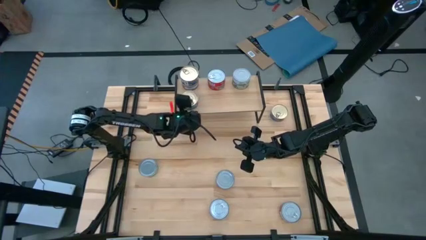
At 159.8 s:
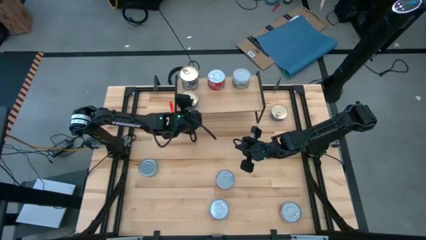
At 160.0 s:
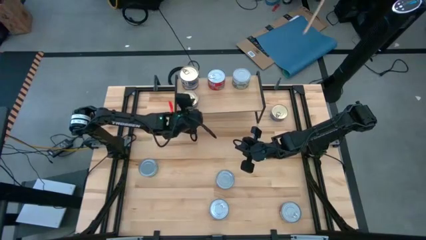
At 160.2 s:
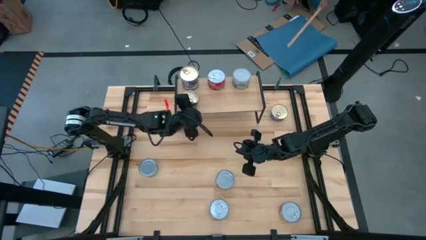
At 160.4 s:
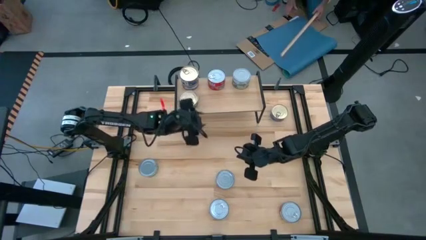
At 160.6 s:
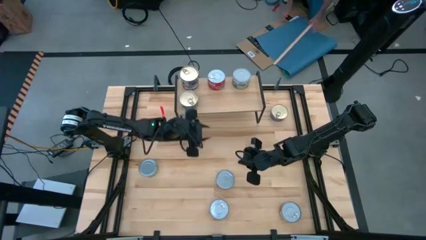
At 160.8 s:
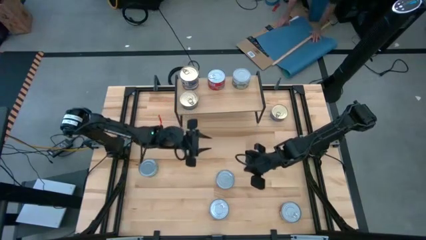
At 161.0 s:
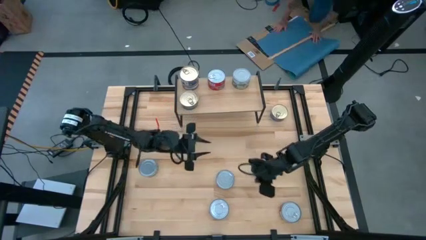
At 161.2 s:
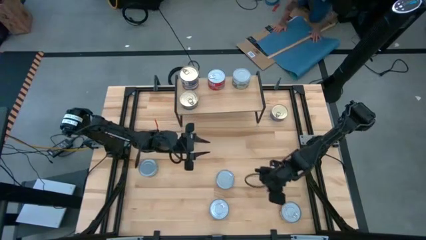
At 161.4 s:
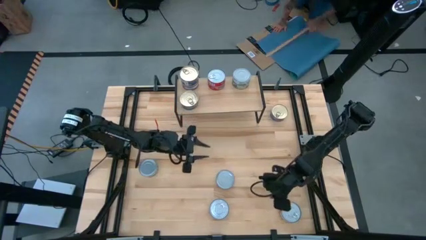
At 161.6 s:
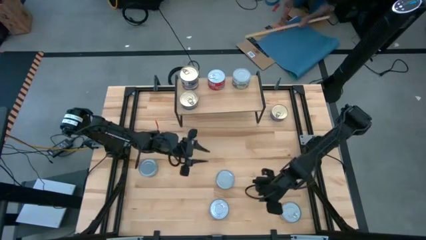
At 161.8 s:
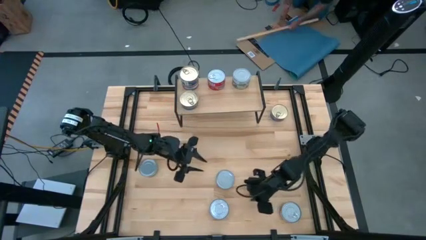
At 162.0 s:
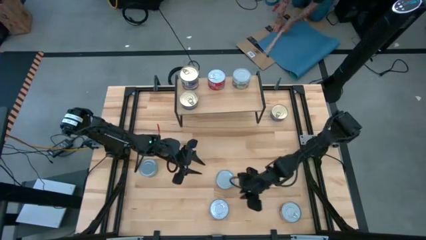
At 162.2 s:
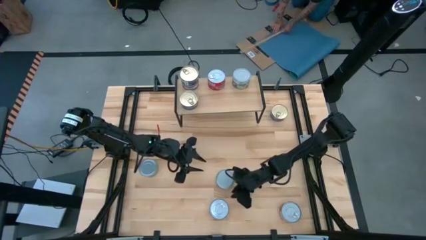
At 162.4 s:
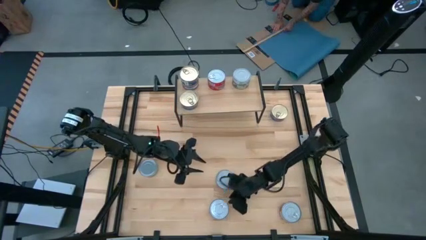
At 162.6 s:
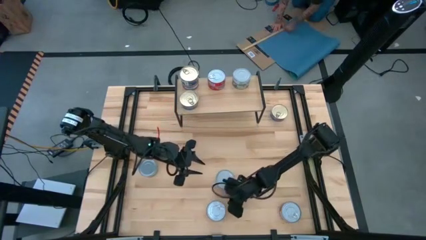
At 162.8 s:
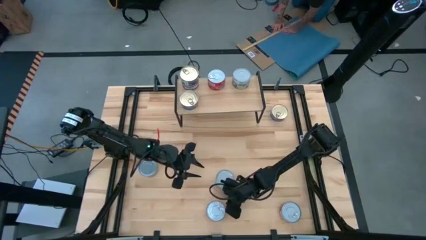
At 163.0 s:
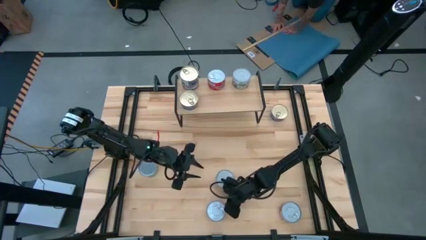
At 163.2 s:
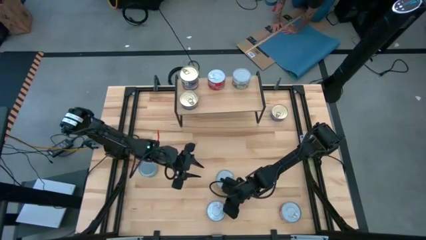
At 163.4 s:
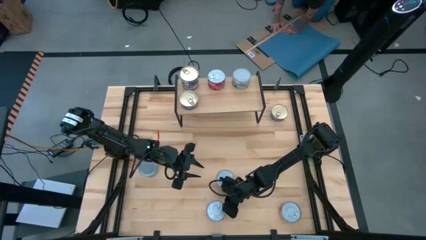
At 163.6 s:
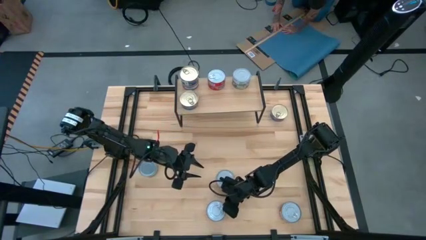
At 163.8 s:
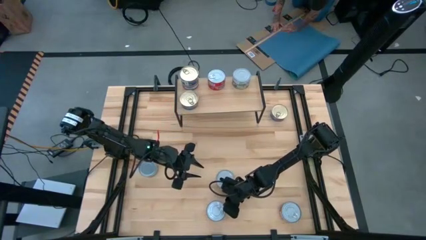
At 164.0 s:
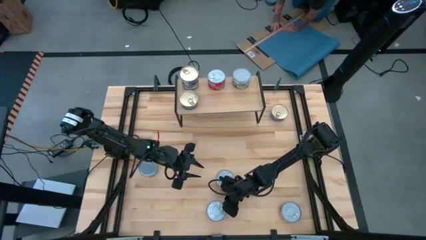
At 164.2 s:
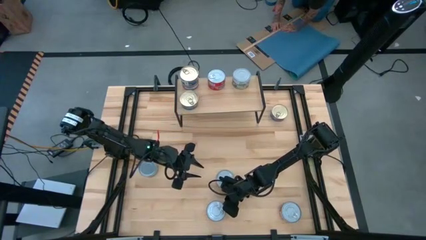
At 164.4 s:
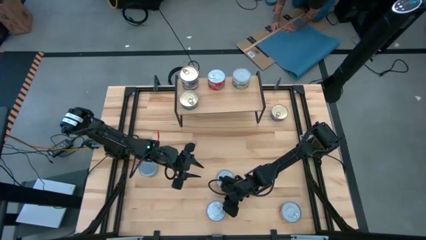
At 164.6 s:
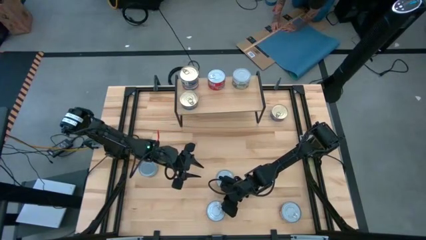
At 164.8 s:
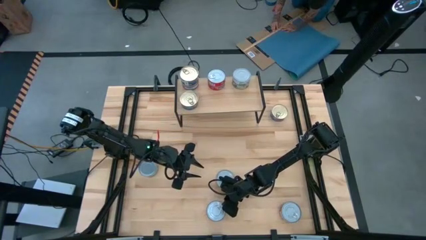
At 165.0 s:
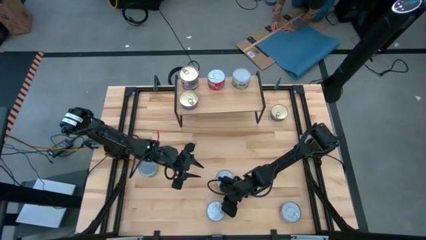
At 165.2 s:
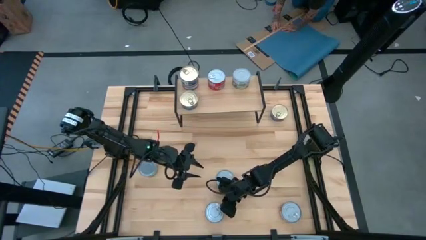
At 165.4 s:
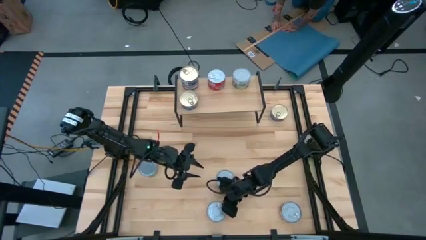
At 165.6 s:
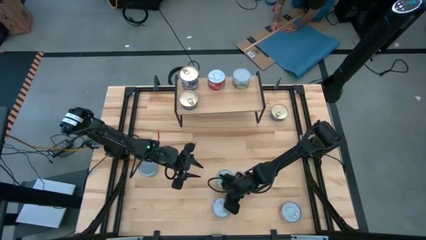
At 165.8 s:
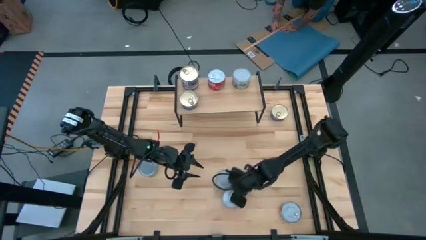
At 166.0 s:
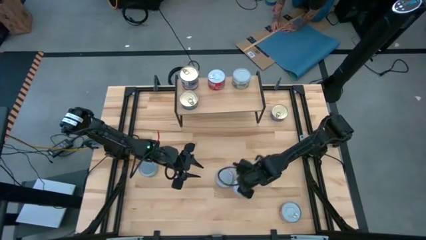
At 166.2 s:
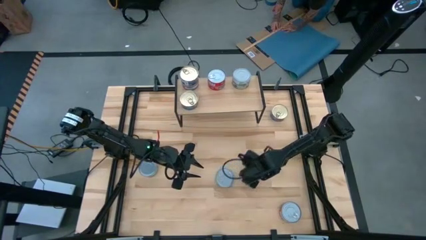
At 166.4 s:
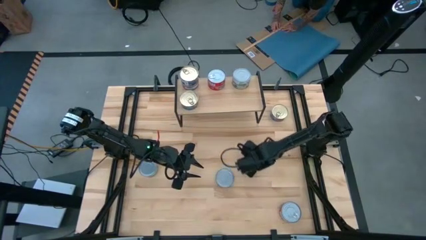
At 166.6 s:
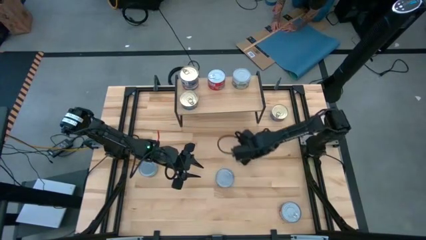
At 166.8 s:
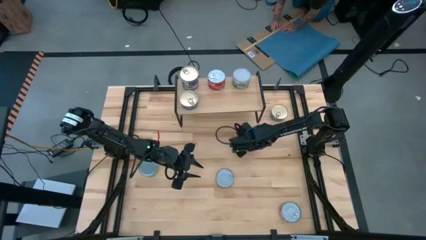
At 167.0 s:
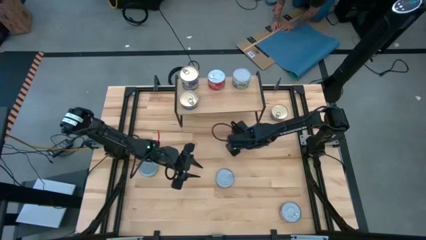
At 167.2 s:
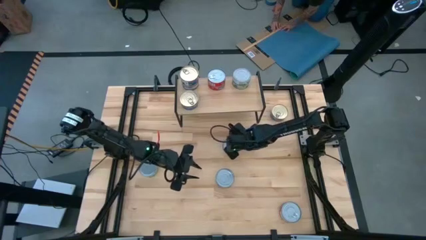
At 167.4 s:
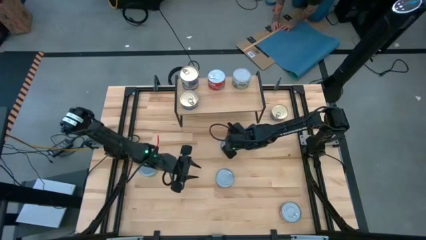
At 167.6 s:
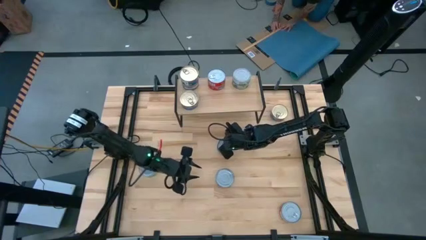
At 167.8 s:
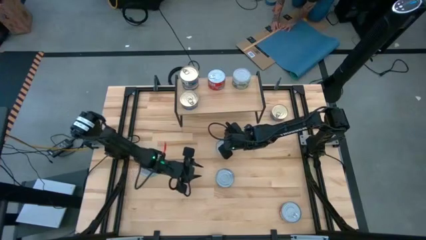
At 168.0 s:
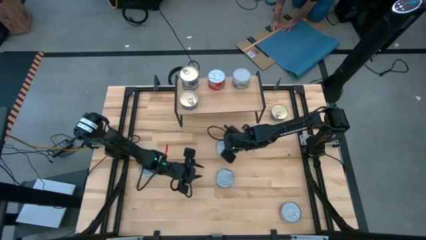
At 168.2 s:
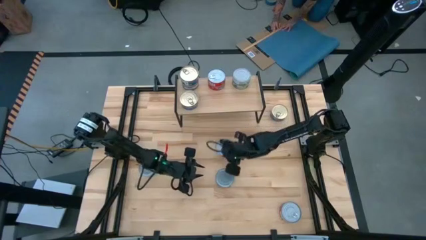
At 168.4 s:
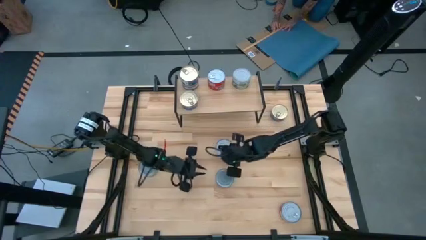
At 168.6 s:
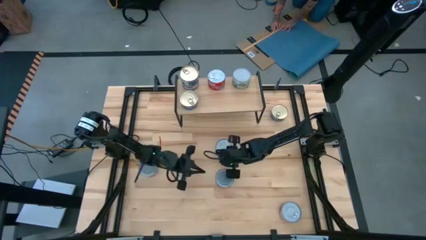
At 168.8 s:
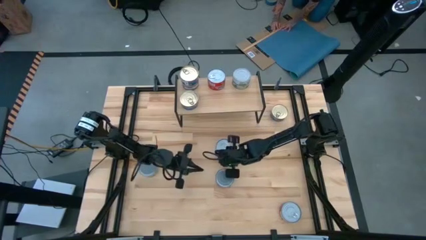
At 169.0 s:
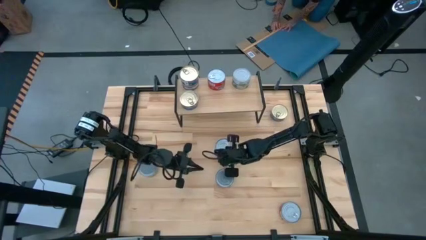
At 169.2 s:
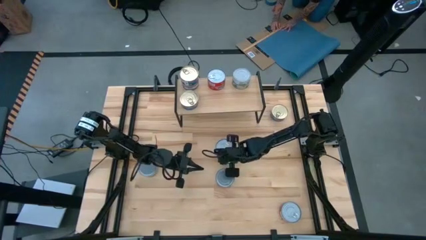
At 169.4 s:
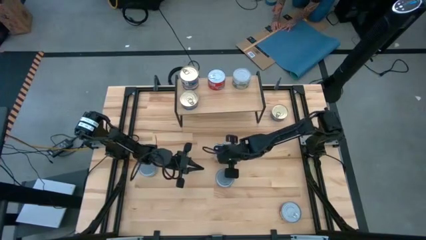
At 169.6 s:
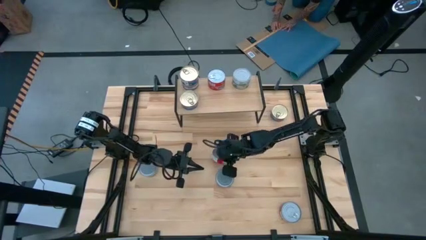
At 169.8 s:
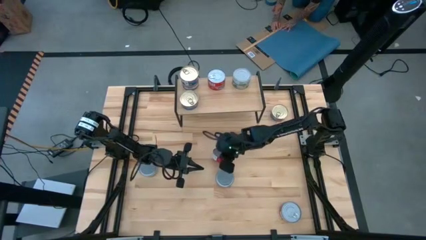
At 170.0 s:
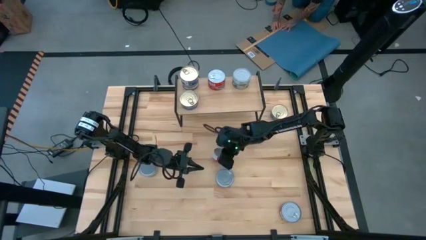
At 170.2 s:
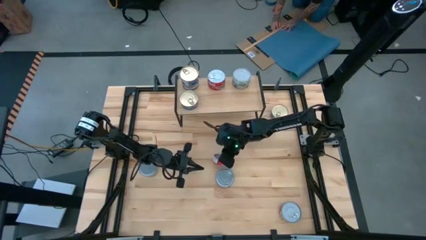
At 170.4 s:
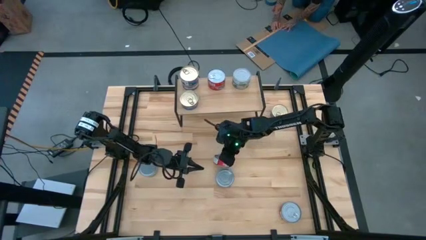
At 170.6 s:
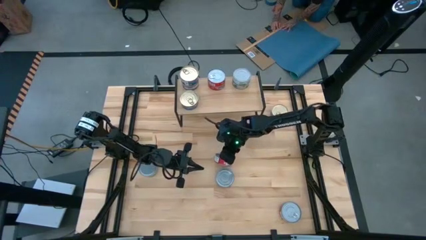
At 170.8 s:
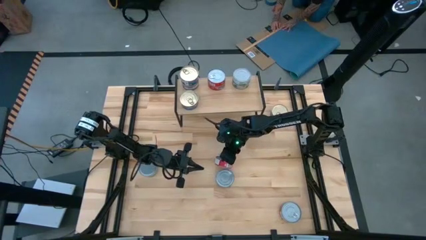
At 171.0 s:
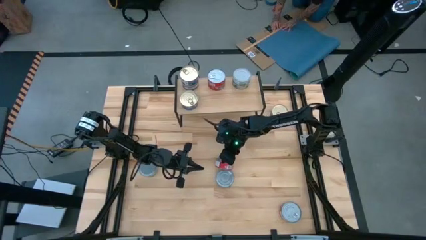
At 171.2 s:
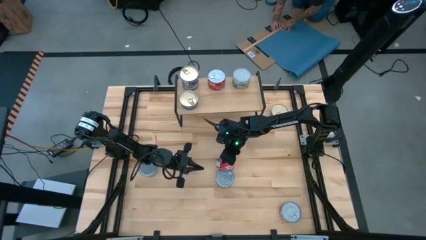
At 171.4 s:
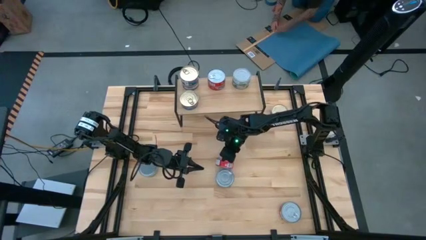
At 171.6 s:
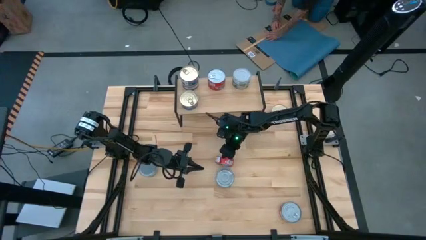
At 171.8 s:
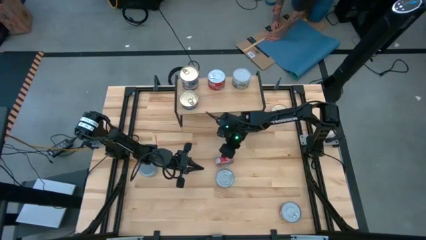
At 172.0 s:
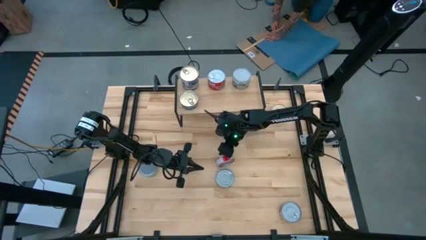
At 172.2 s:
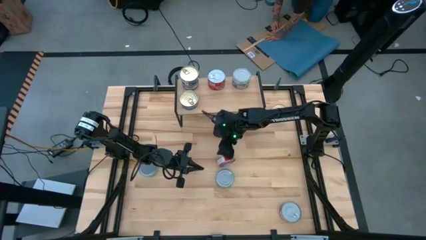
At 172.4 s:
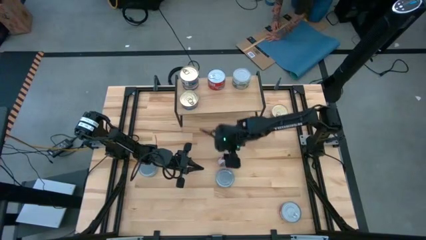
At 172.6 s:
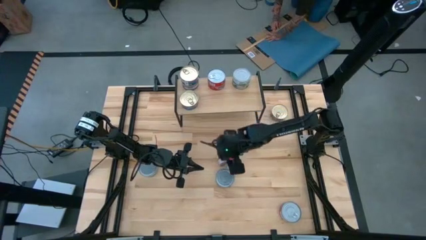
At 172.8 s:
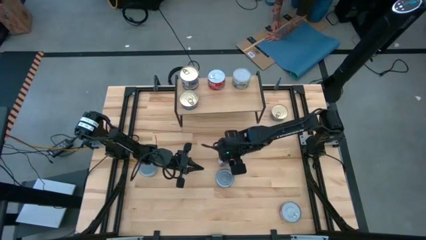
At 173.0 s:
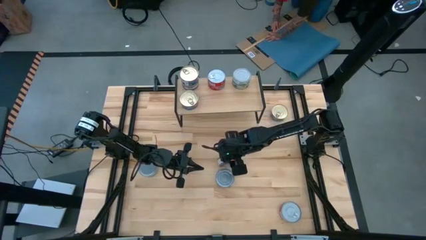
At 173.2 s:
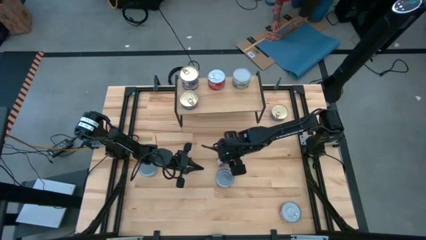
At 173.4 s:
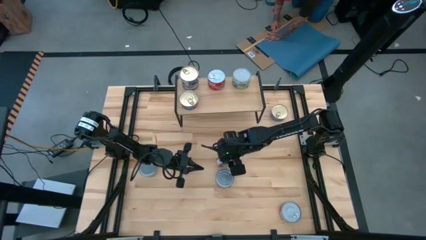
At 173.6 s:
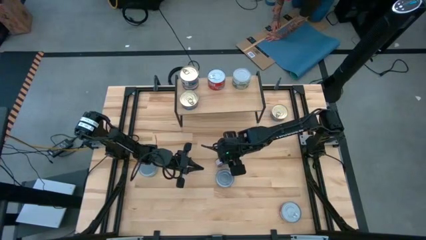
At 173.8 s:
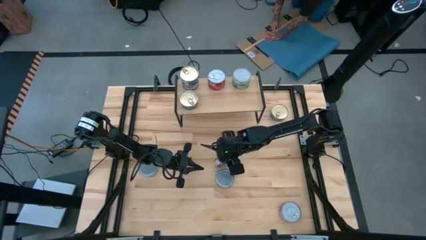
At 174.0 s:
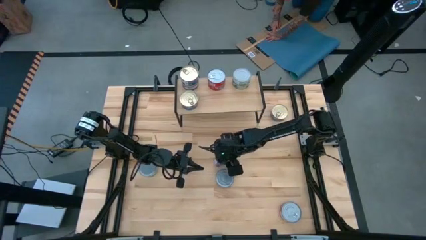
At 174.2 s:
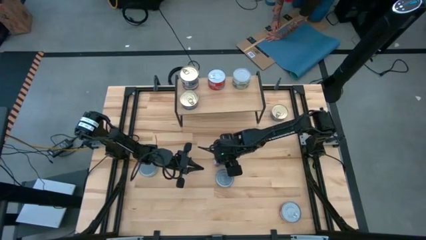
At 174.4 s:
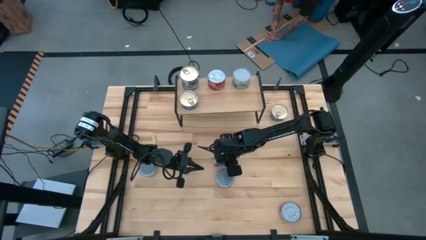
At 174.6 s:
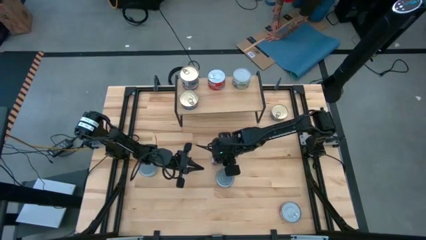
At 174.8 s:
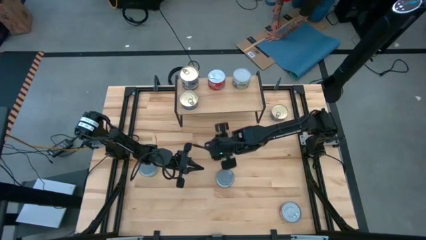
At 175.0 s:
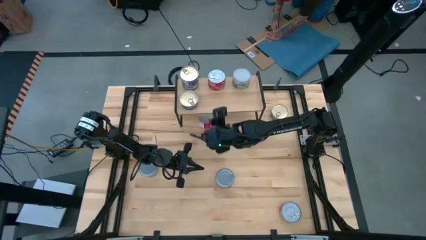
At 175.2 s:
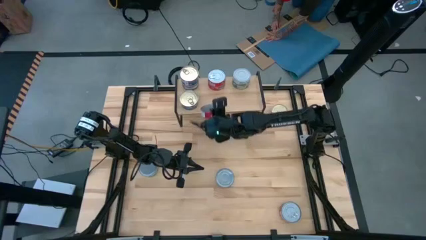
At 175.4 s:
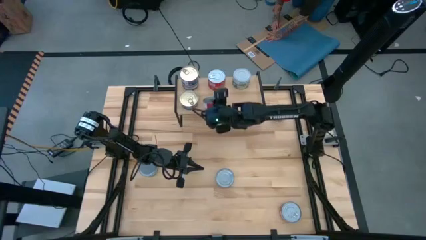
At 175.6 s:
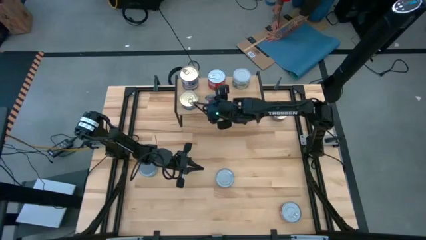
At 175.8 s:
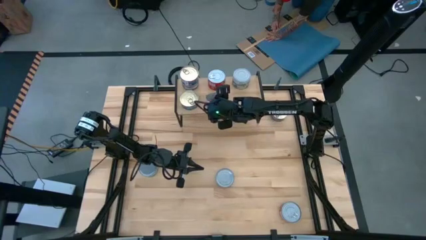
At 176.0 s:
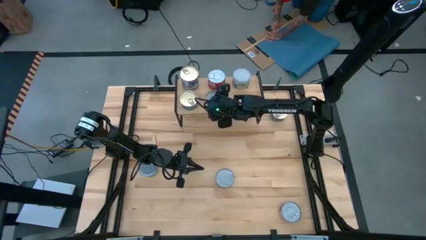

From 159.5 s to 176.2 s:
Task: Stack canned seafood by type on shelf
Put the red tuna can on the shelf aligned with the other red tuna can
